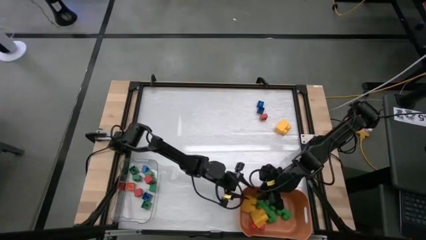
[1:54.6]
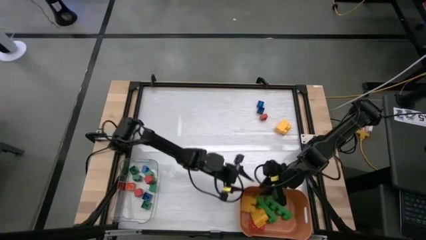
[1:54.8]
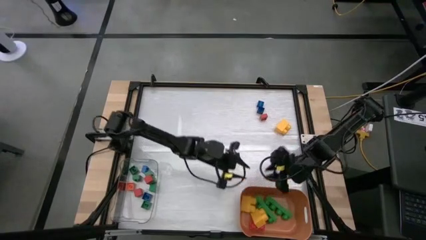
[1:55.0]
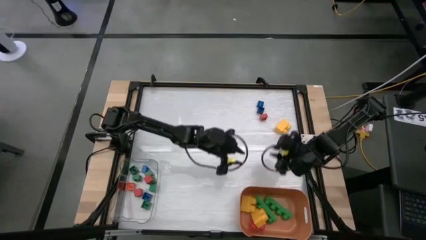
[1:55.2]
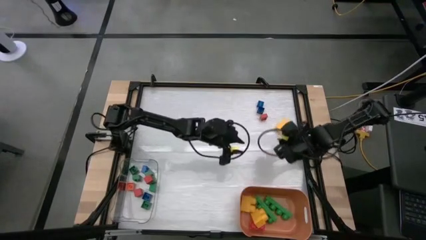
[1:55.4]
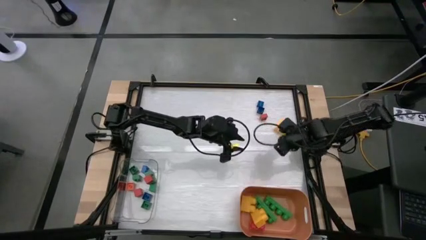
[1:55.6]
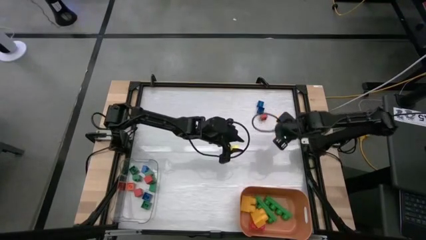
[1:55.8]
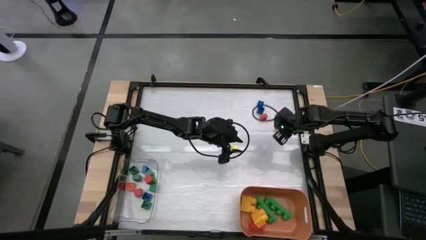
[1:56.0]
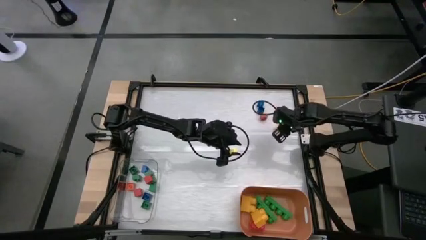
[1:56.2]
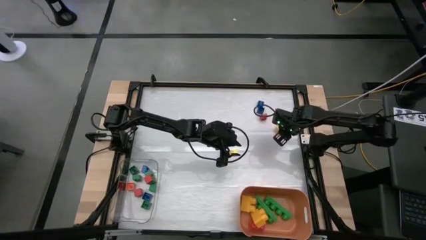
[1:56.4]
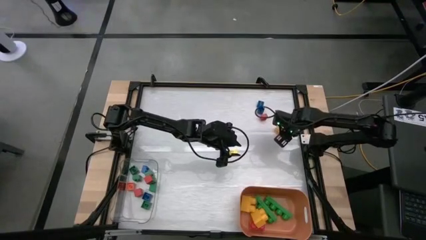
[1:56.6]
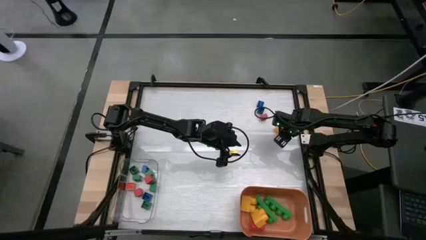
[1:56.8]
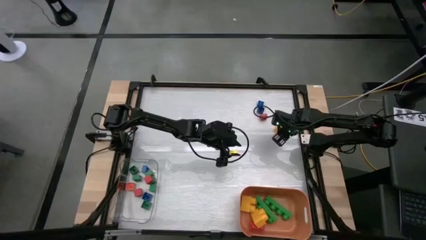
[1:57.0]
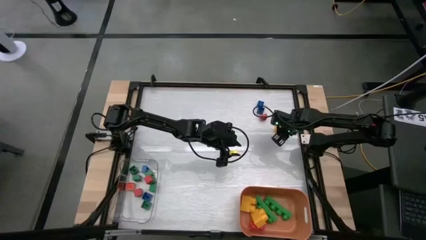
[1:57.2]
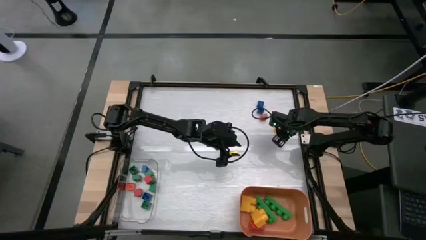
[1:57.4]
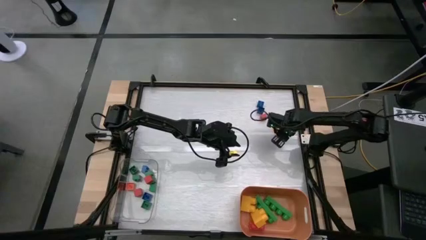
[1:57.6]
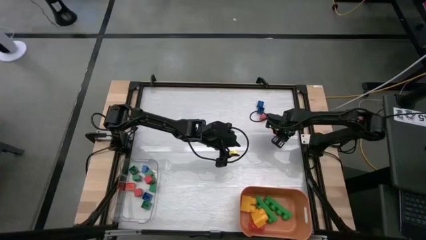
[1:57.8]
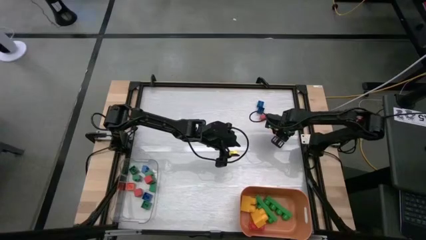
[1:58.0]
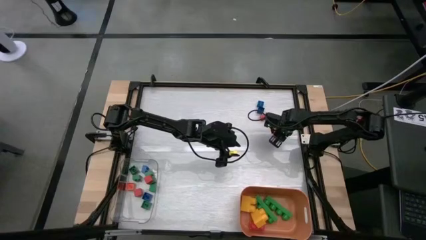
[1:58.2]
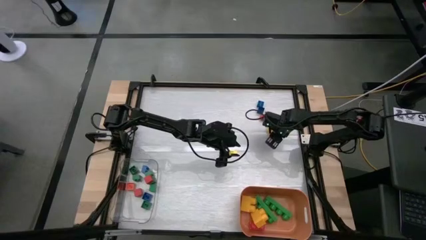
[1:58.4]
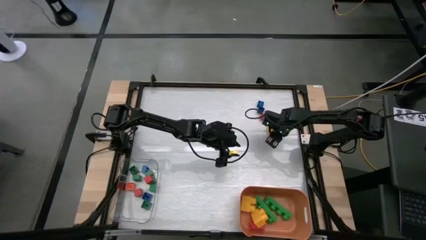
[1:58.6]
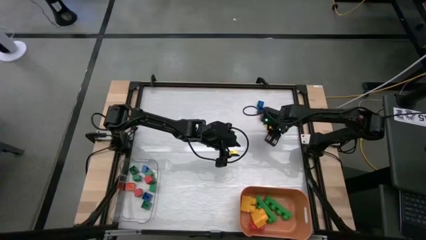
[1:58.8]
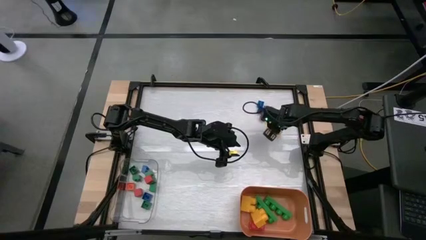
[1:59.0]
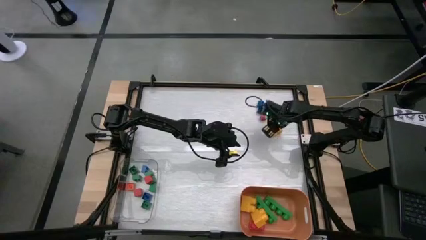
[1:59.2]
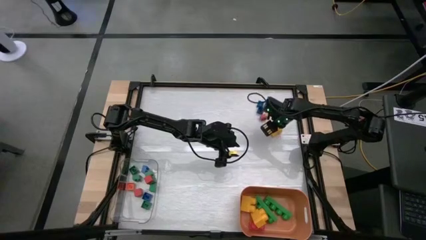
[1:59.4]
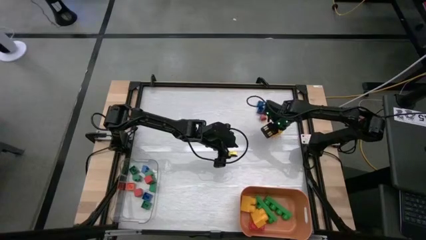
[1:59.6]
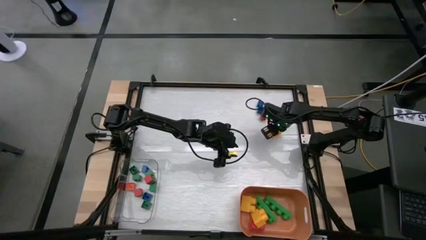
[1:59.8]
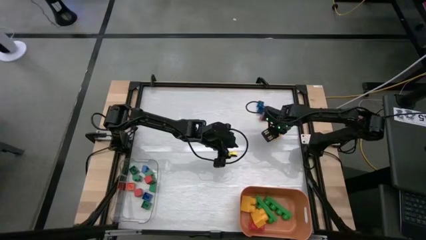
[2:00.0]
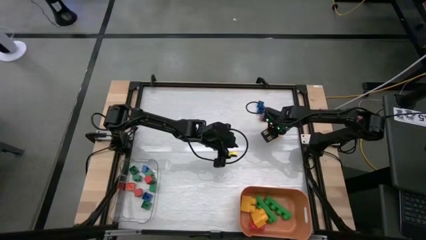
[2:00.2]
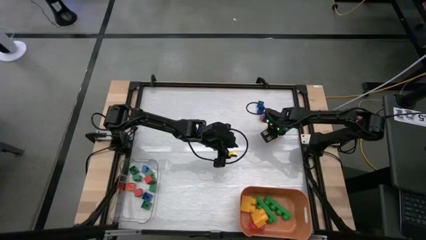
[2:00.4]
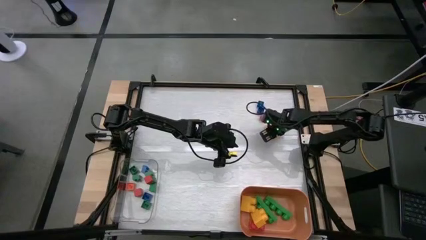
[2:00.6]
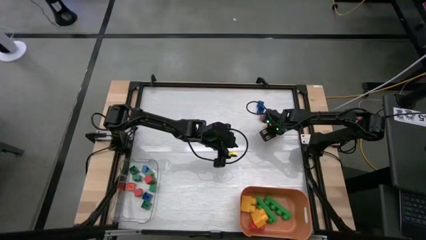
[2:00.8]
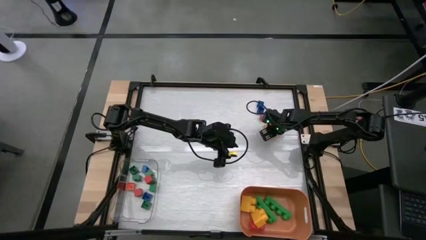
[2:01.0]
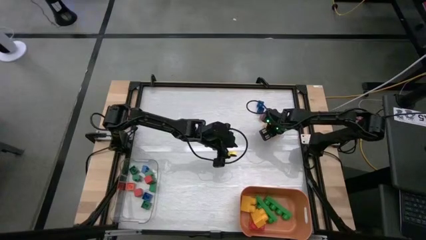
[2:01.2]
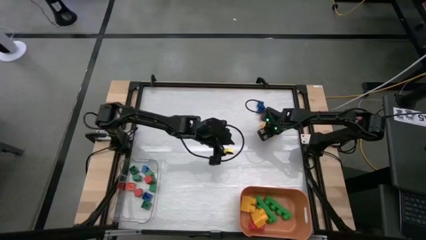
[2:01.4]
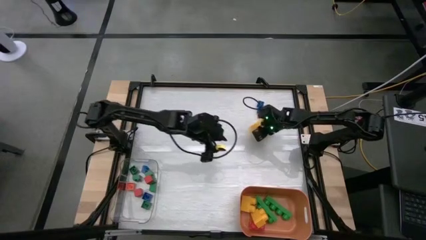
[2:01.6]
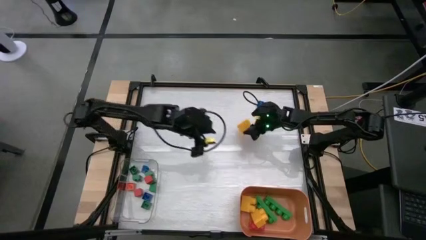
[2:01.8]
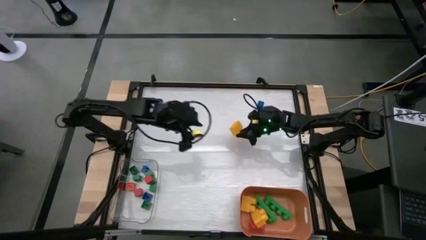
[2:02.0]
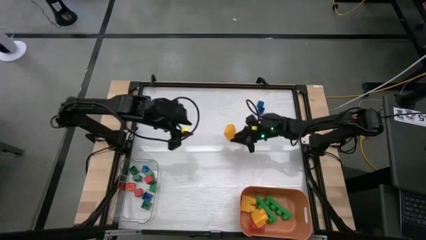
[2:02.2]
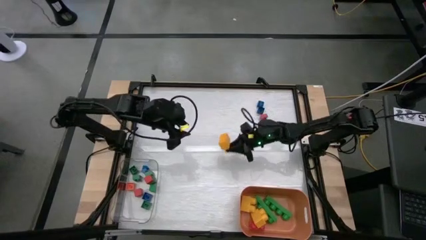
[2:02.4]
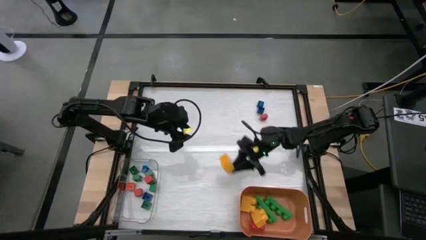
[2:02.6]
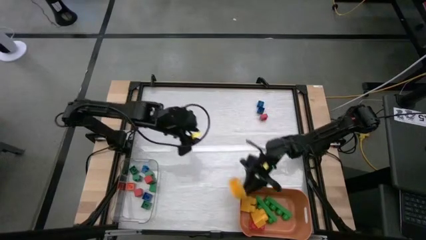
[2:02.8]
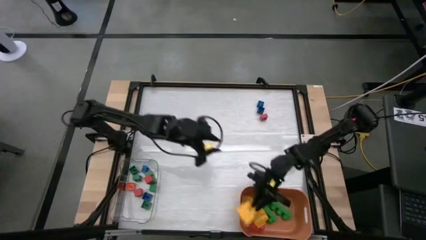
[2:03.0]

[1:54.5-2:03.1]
Task: Sort blocks by size
Put the big yellow game piece into the orange bin

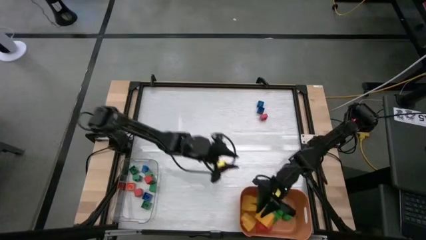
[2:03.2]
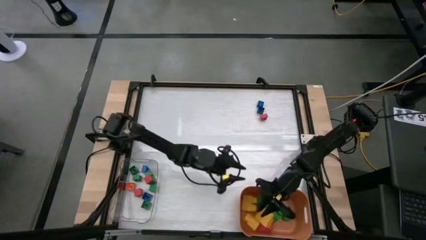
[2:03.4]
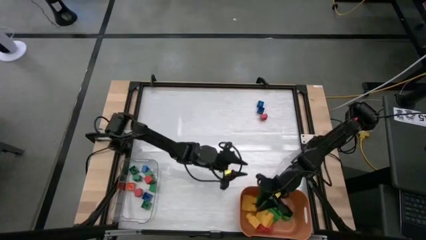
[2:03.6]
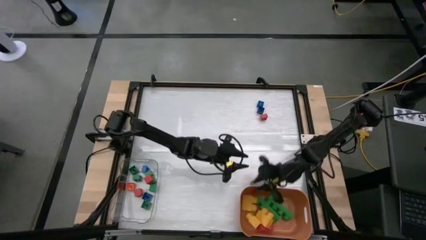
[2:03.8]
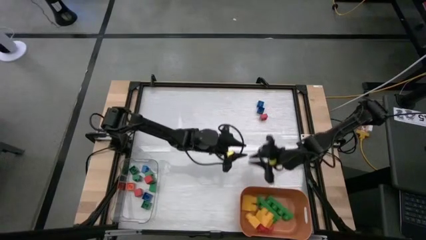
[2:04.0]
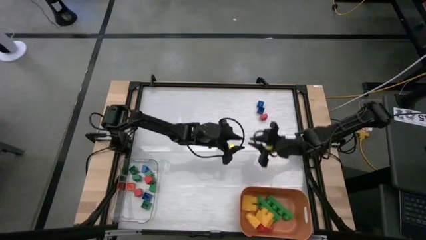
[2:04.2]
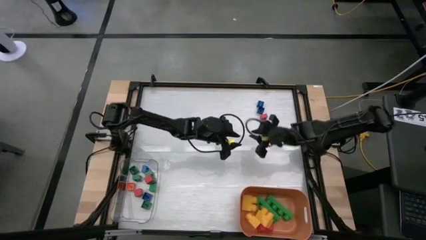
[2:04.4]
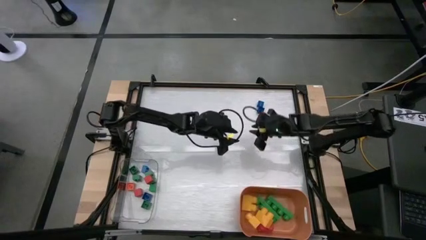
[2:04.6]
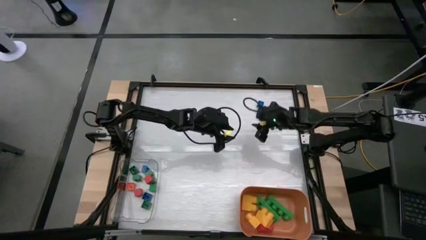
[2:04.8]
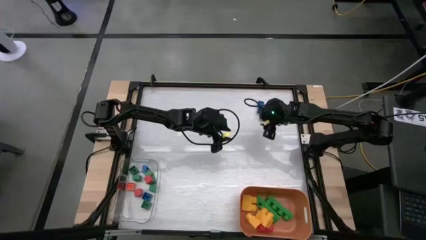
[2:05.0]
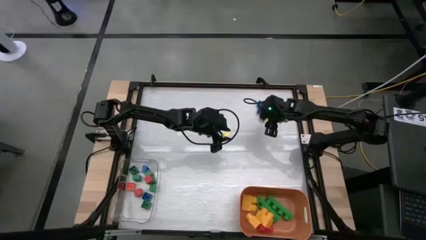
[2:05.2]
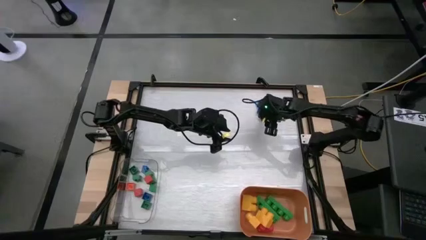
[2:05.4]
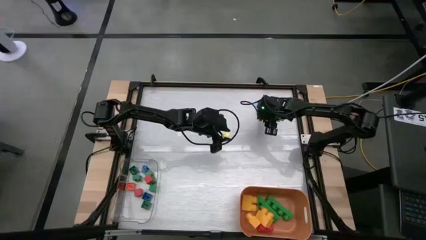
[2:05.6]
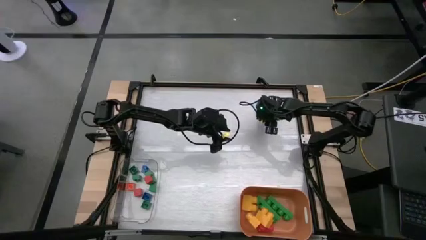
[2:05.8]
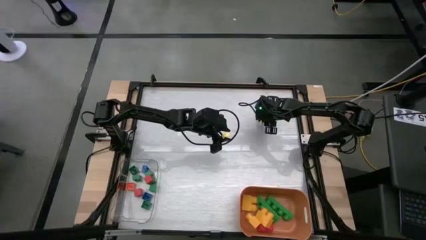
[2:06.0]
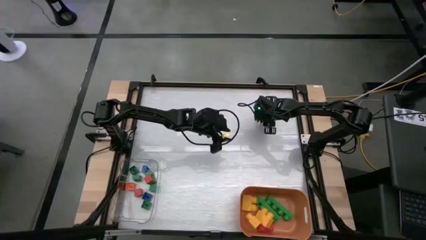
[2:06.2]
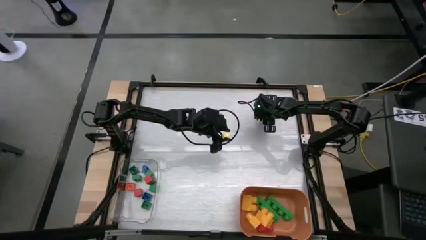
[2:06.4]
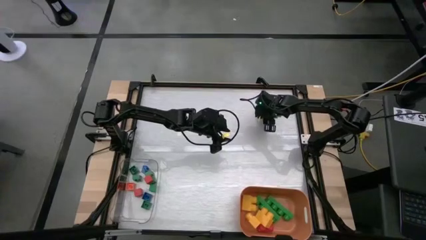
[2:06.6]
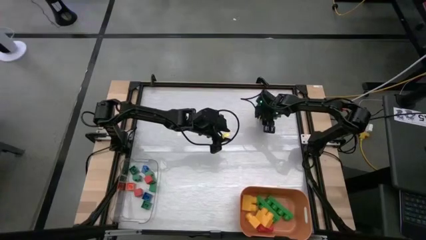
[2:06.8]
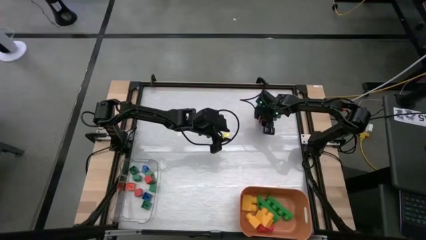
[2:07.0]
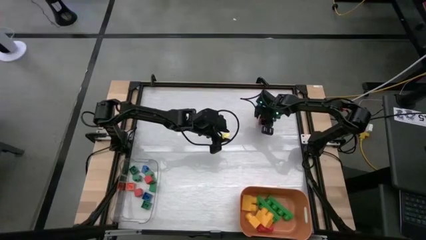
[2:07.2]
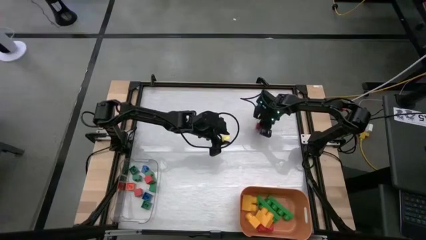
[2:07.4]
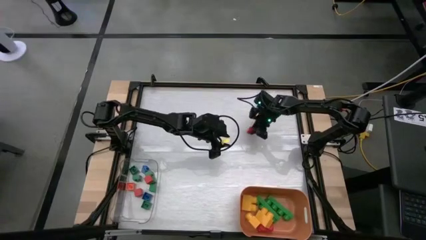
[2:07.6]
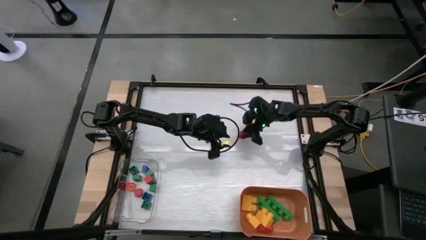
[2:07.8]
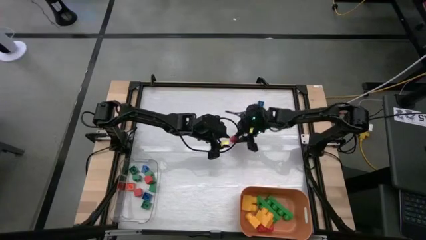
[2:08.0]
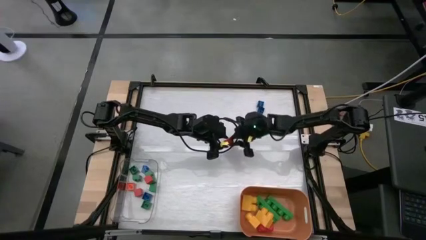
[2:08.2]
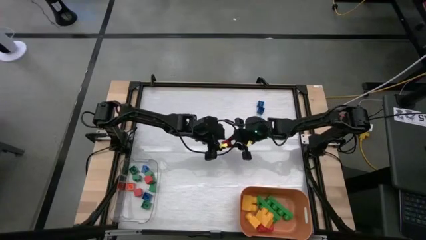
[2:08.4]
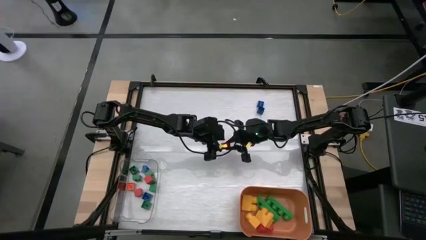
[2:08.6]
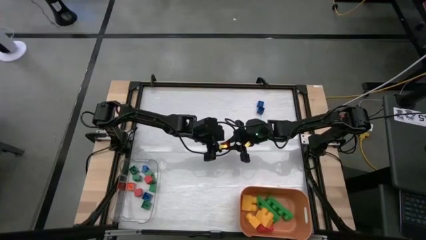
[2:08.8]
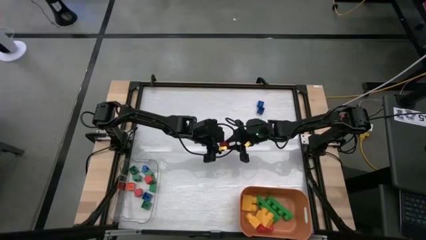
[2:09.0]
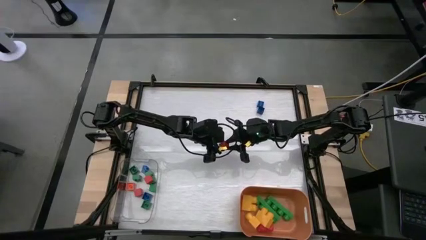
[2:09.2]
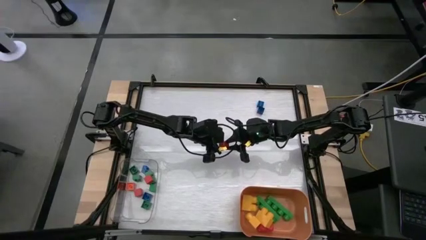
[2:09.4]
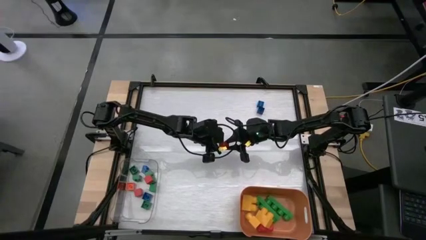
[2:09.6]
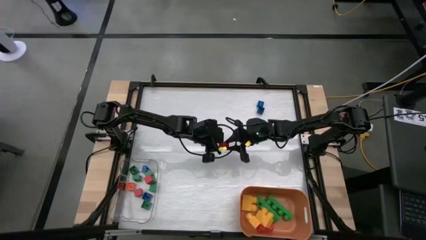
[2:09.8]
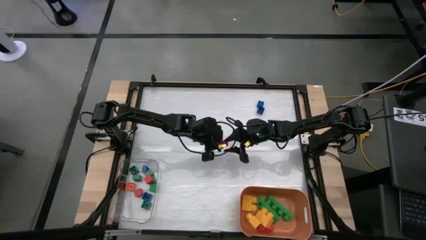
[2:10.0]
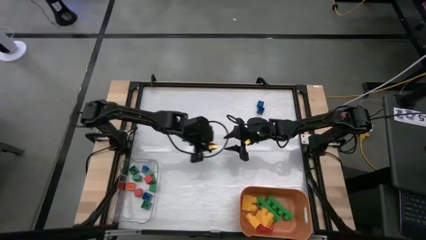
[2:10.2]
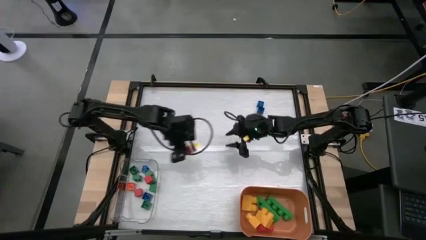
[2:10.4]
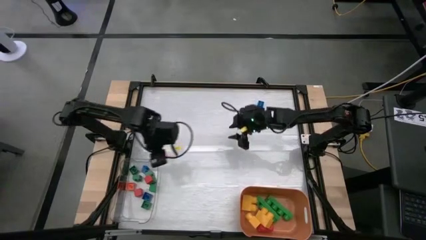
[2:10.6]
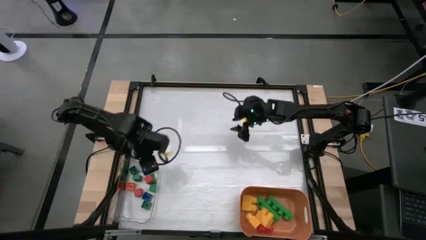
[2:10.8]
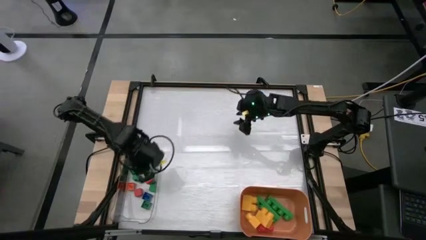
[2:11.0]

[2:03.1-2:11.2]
Put the small red game piece into the transparent bin
